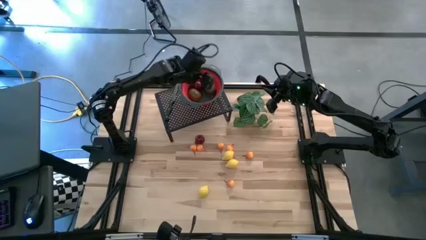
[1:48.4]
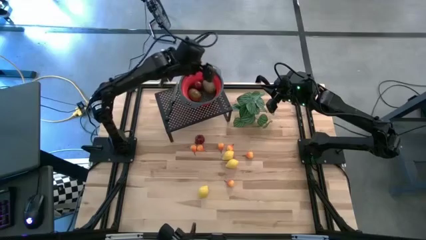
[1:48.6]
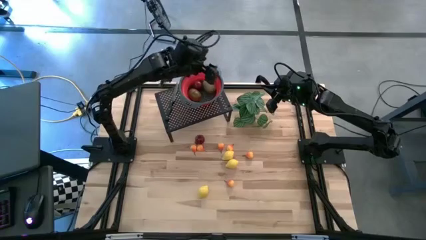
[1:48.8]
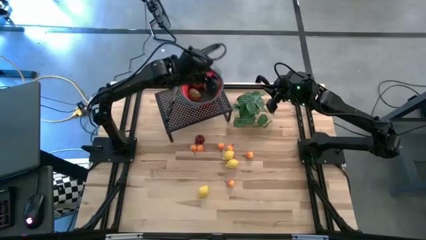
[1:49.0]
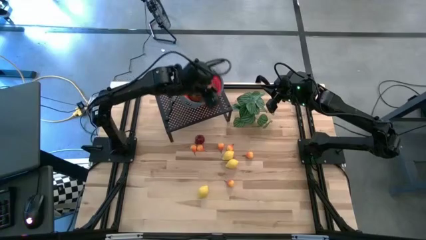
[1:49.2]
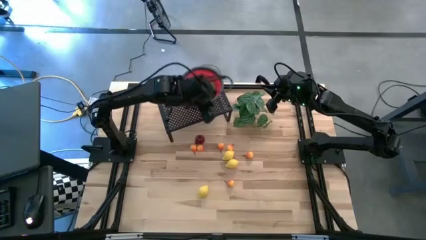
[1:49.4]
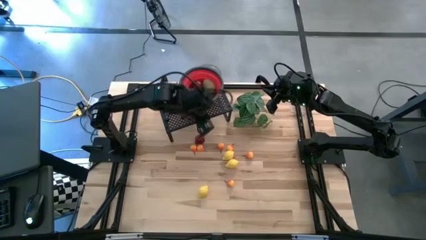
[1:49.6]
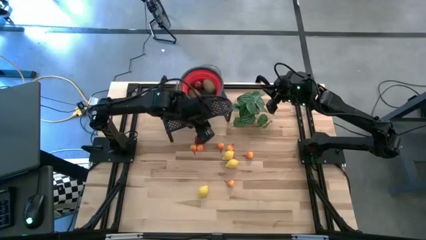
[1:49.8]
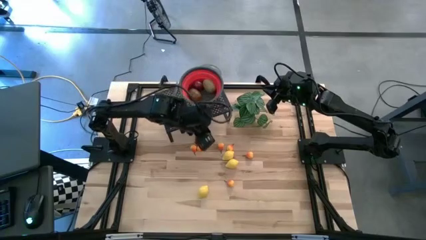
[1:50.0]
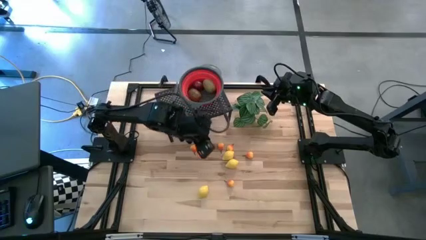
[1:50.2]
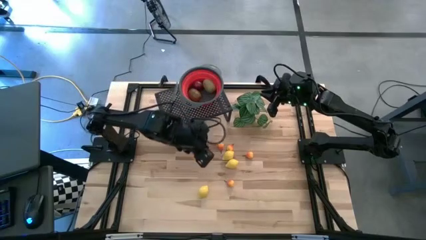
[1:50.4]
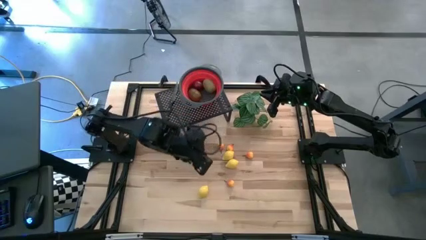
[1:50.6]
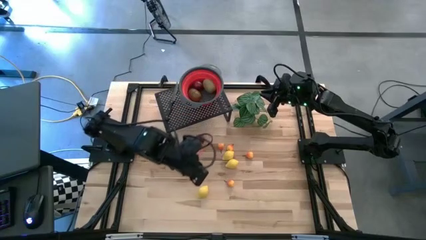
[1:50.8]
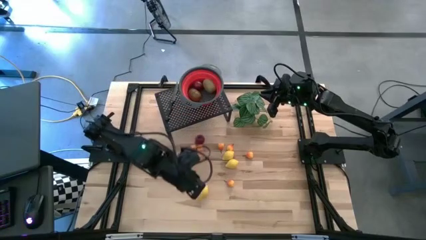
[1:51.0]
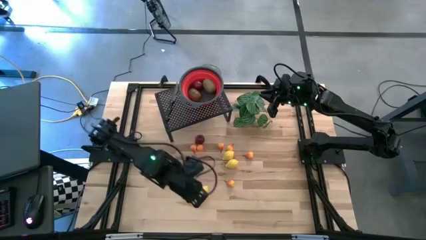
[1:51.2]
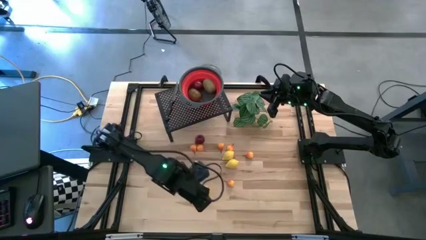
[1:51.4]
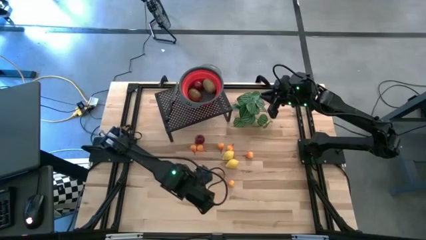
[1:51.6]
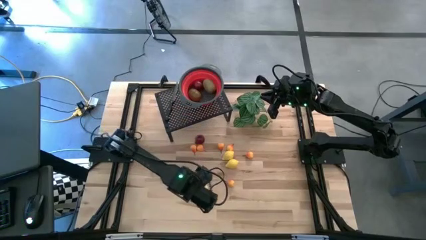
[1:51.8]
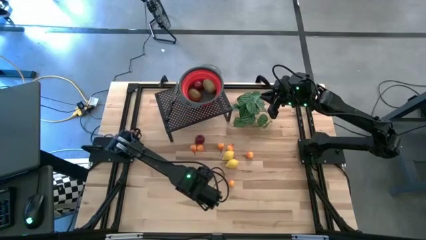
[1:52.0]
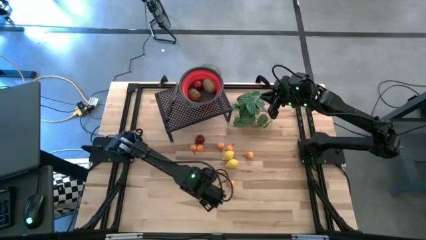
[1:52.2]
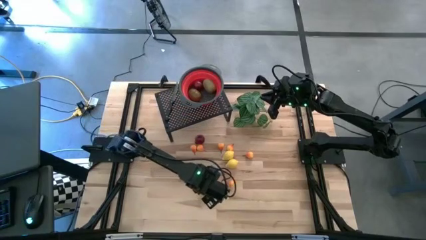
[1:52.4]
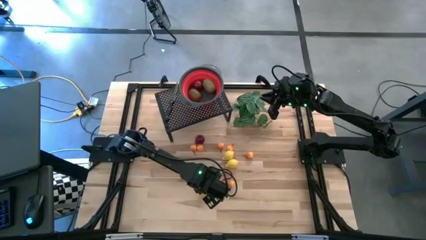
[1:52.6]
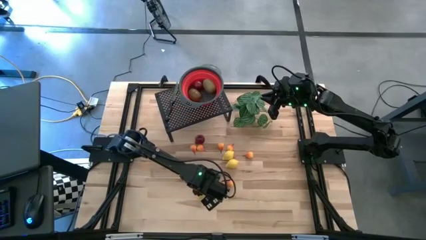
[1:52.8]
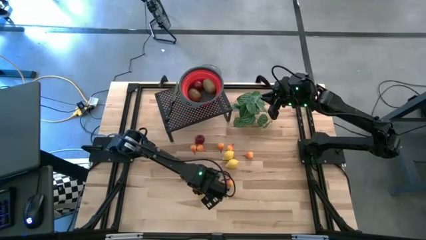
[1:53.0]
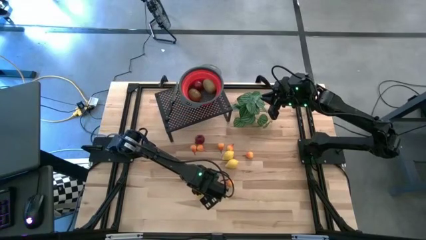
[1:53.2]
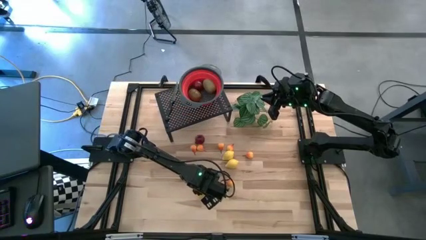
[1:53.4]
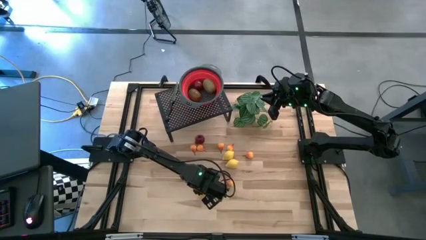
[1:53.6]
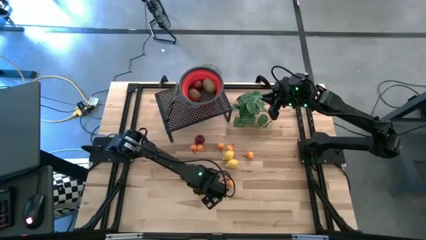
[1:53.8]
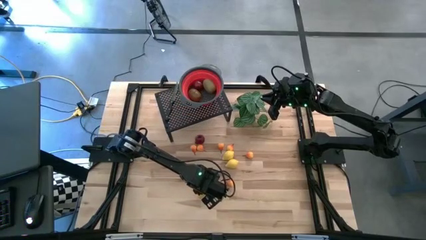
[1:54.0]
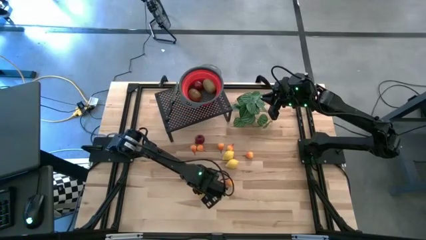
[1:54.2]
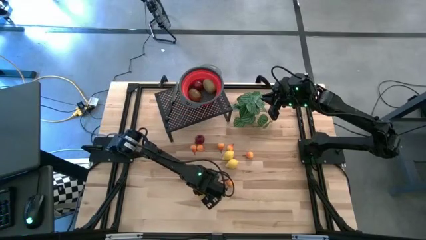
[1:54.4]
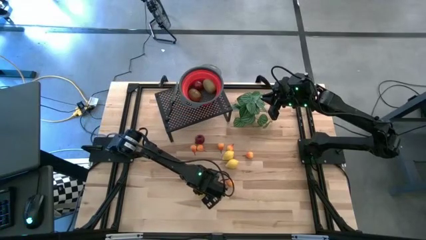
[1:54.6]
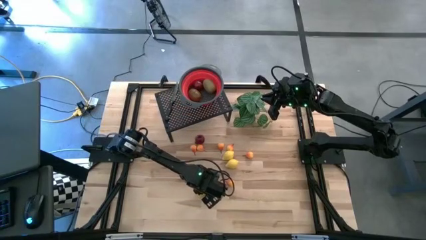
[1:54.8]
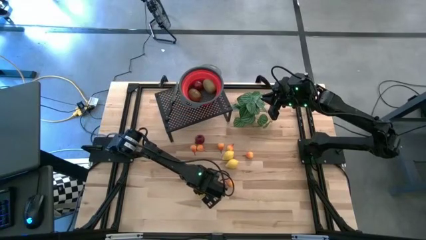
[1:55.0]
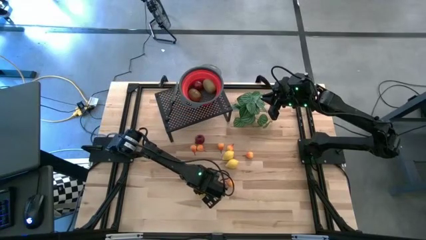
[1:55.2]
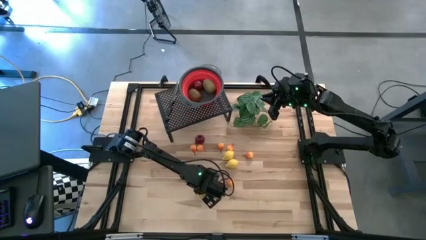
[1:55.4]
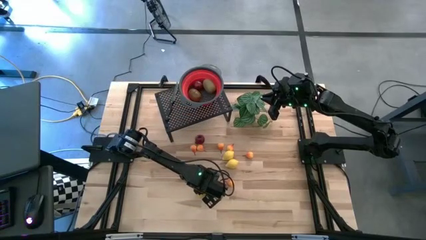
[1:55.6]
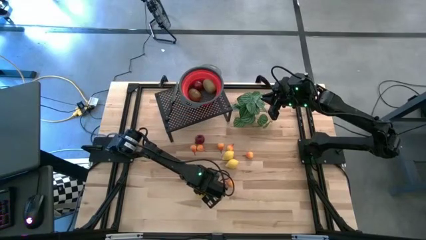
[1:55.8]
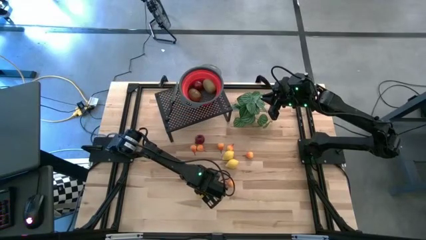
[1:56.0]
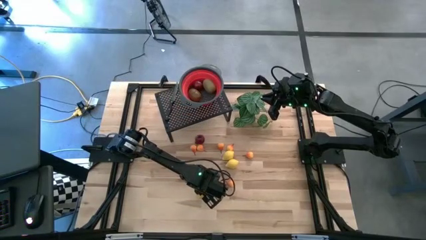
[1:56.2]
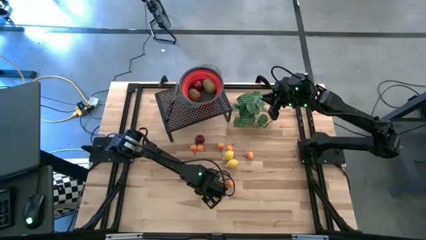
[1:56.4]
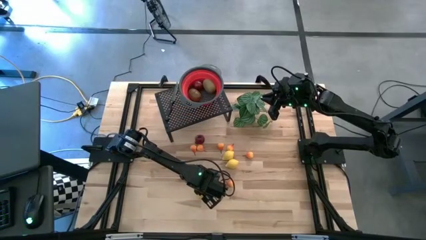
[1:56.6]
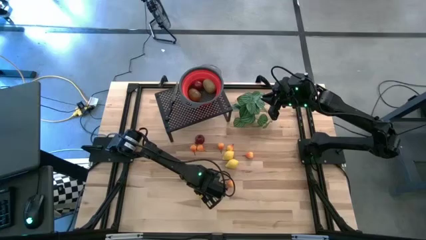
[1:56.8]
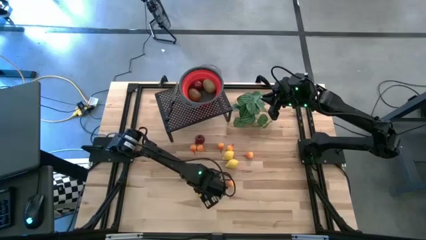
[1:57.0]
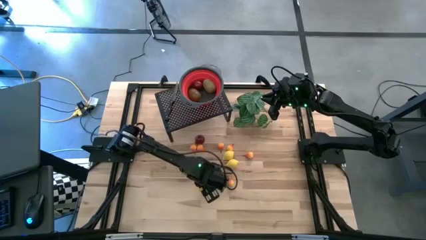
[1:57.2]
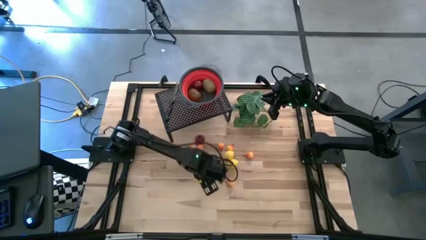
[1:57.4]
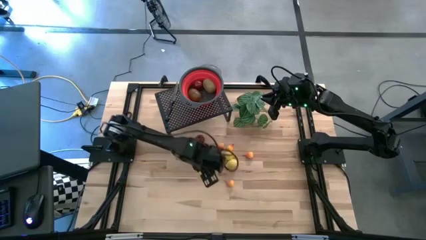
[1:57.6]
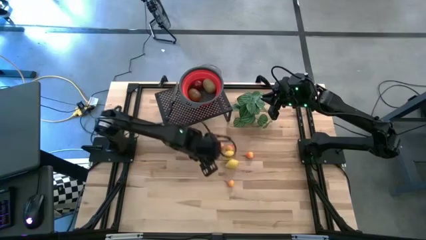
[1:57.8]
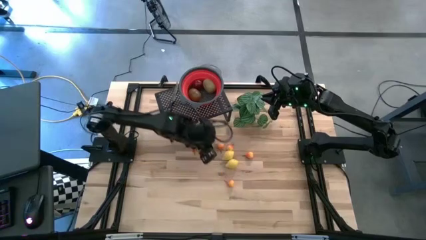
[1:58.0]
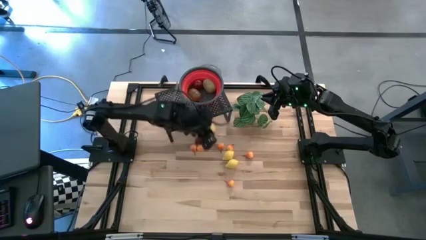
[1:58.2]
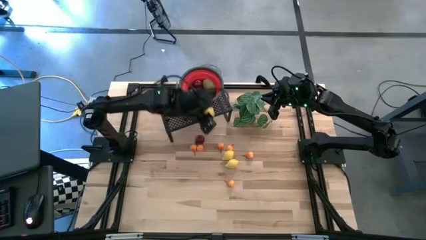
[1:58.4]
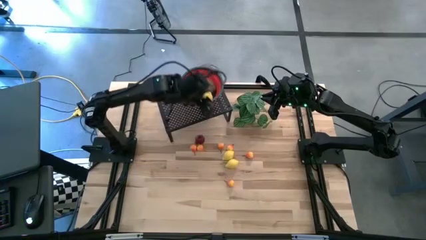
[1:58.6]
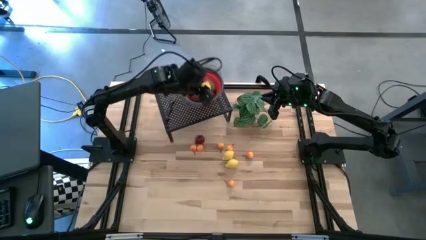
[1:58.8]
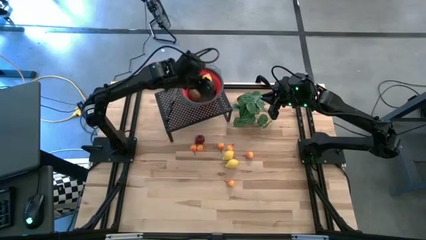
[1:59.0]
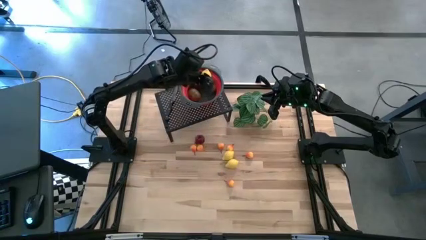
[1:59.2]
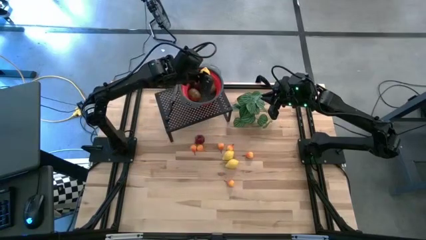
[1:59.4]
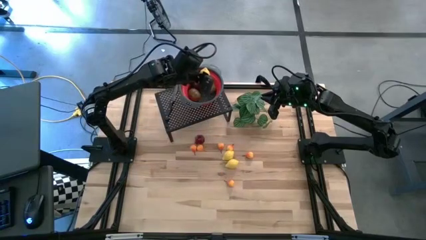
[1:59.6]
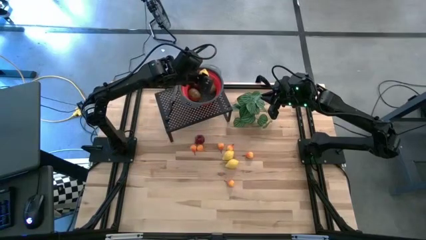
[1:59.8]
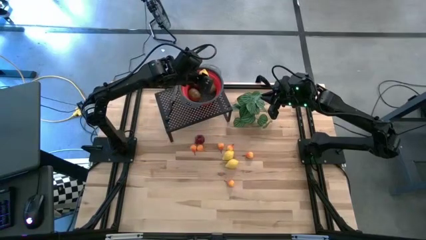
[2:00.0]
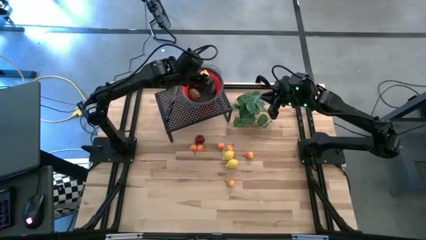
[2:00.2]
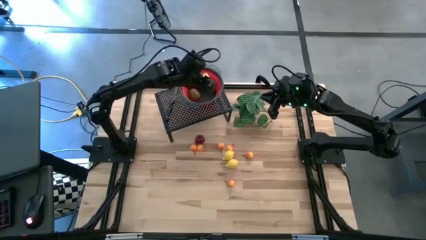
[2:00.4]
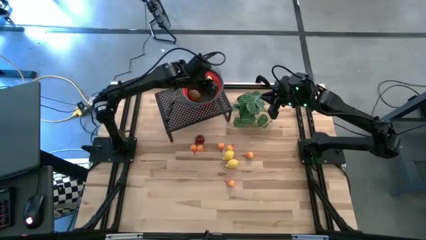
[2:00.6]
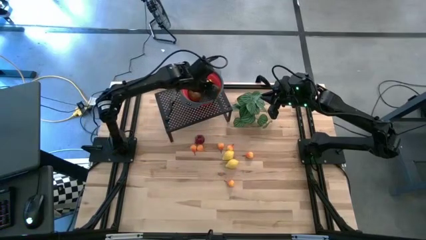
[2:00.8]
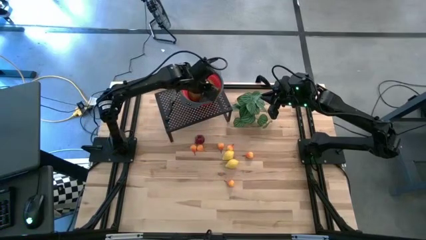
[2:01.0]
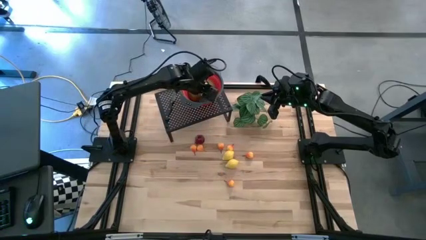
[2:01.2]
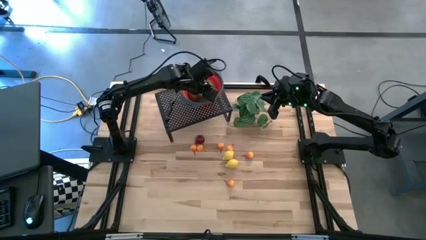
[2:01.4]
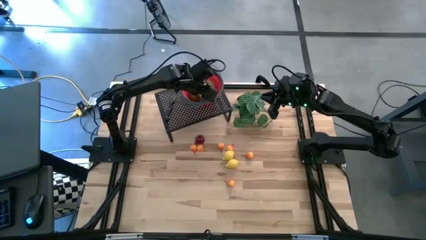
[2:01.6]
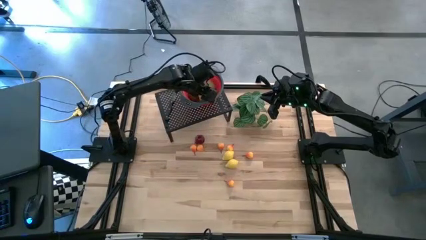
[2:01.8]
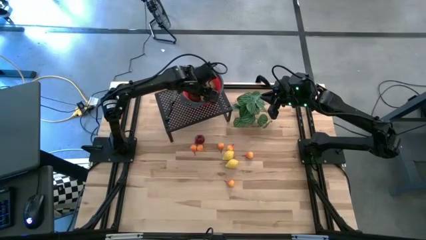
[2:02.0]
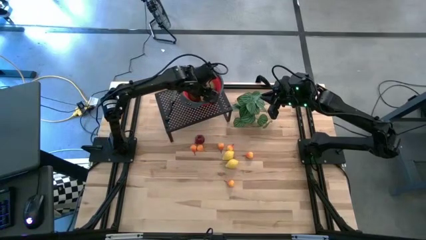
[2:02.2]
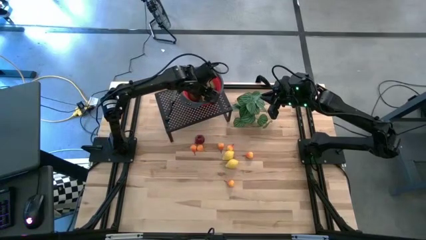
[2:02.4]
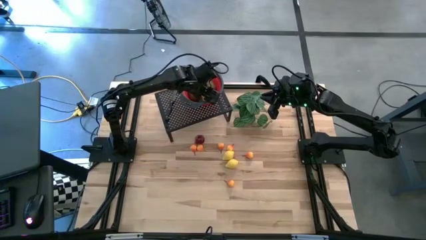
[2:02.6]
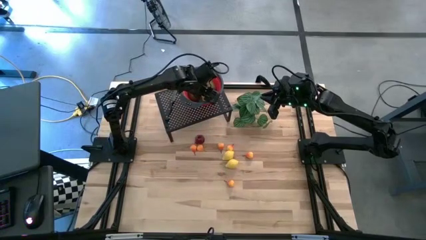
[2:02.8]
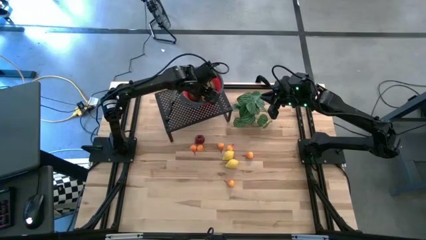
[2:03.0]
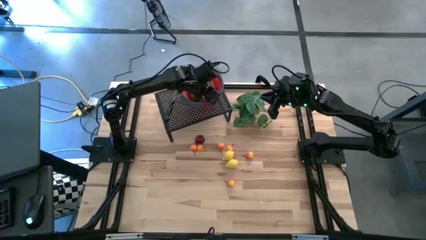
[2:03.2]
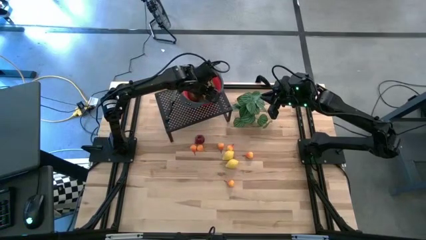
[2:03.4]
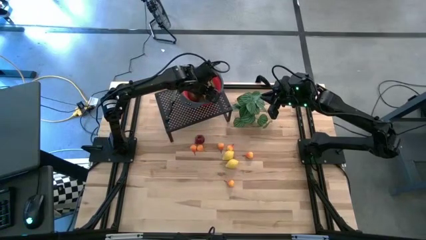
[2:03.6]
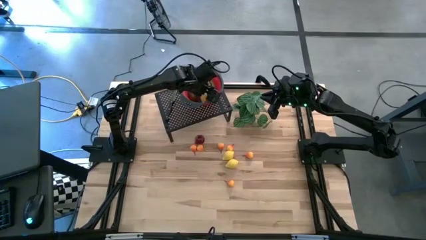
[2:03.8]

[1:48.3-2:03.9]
Task: Pick & Place Fruit
Put the bottom yellow lemon into the red basket on the shelf
